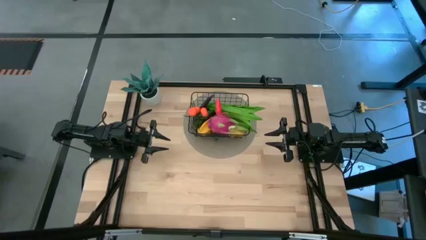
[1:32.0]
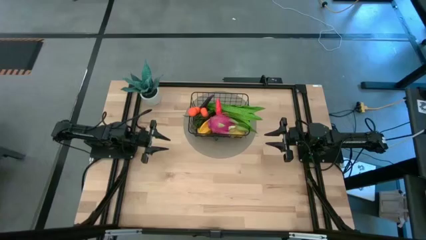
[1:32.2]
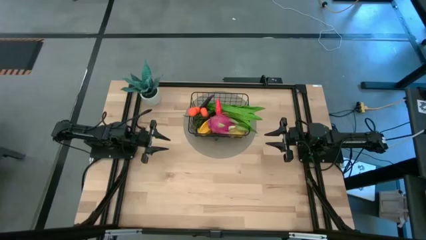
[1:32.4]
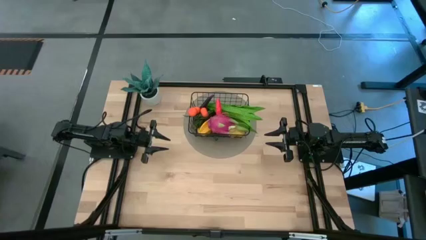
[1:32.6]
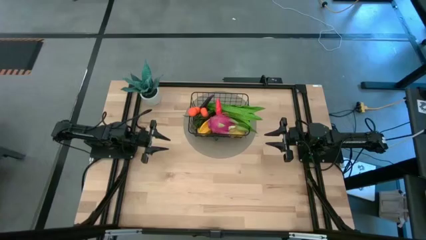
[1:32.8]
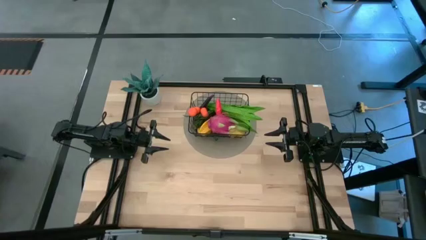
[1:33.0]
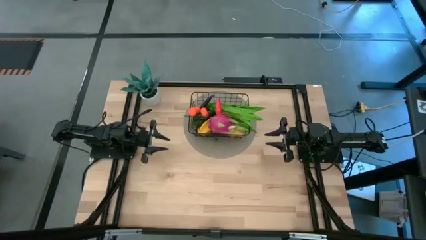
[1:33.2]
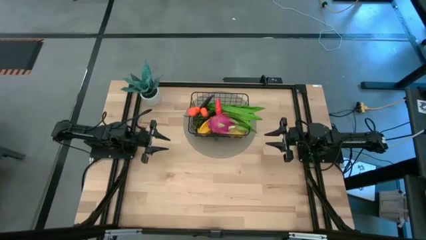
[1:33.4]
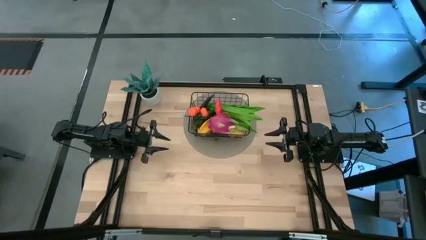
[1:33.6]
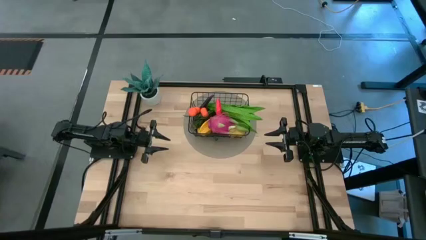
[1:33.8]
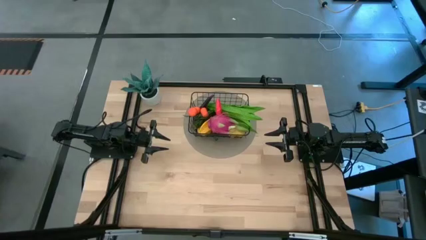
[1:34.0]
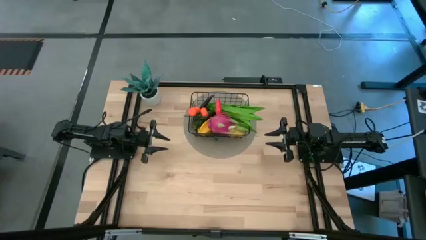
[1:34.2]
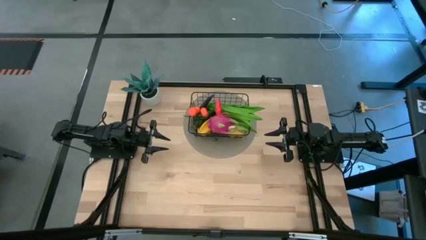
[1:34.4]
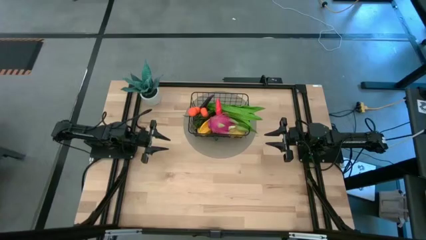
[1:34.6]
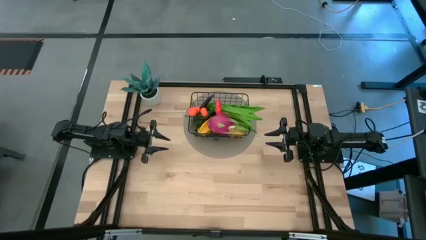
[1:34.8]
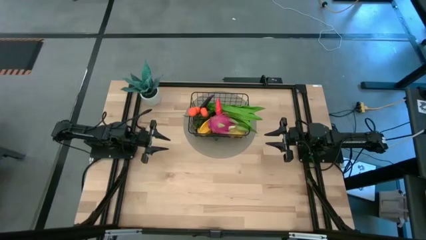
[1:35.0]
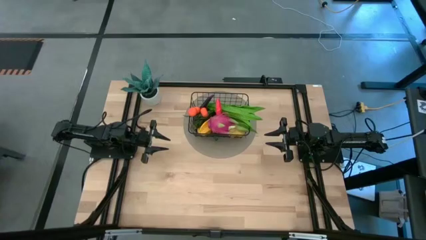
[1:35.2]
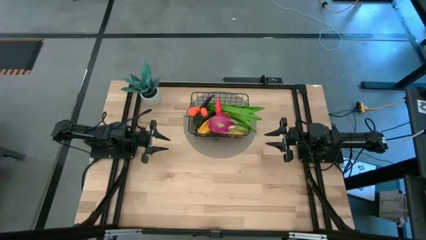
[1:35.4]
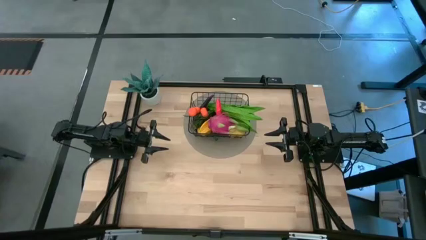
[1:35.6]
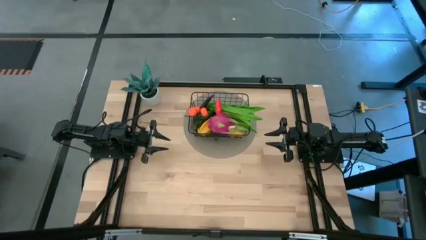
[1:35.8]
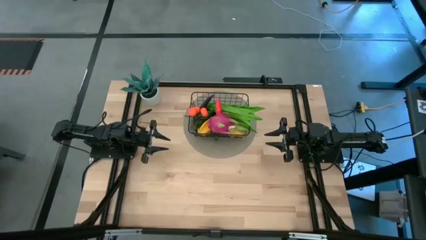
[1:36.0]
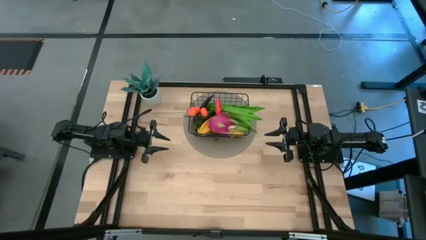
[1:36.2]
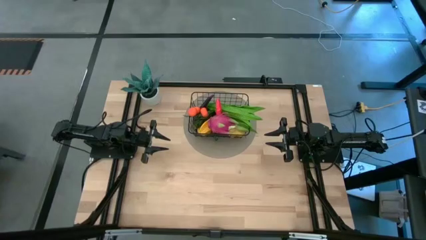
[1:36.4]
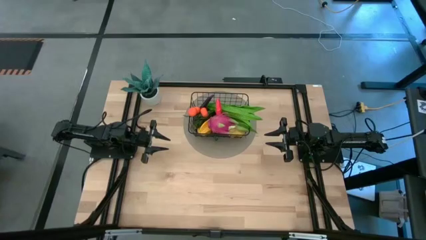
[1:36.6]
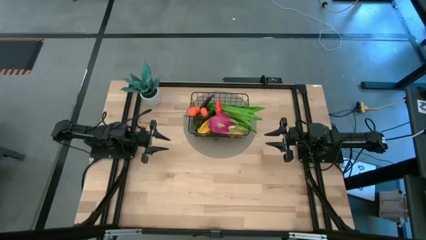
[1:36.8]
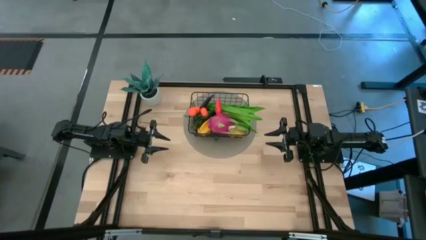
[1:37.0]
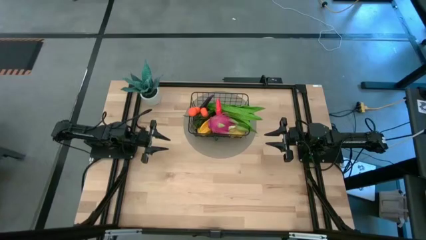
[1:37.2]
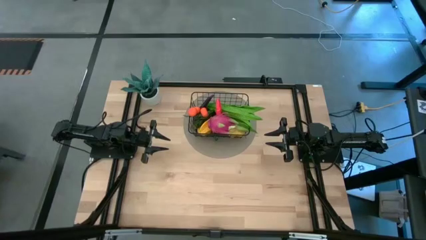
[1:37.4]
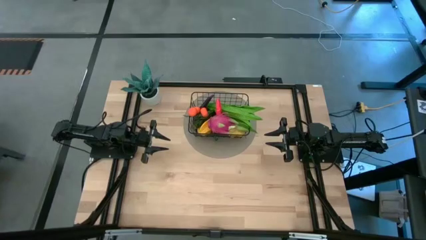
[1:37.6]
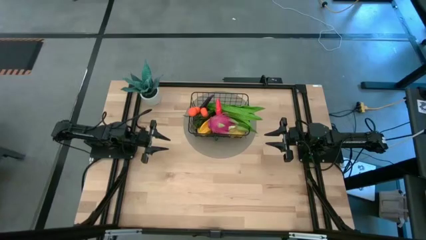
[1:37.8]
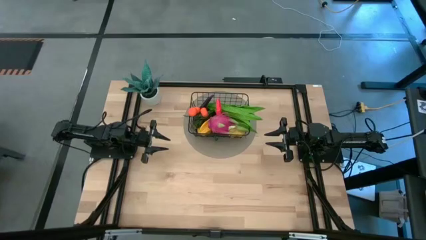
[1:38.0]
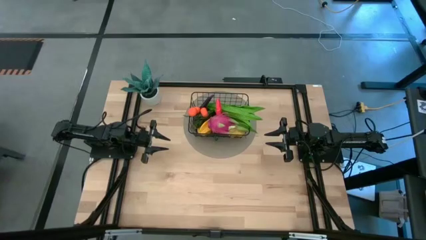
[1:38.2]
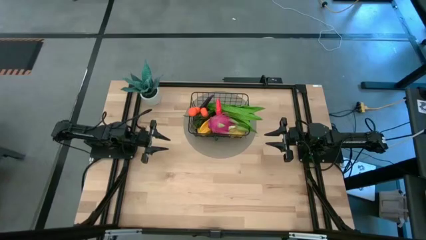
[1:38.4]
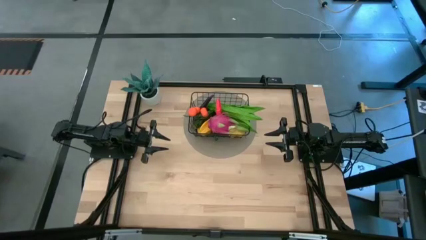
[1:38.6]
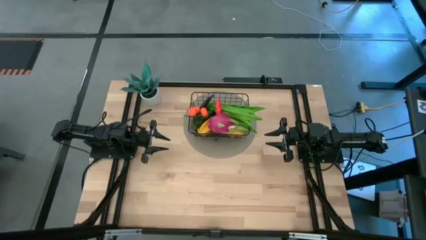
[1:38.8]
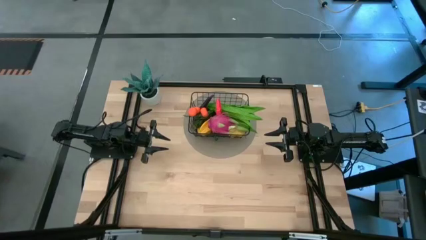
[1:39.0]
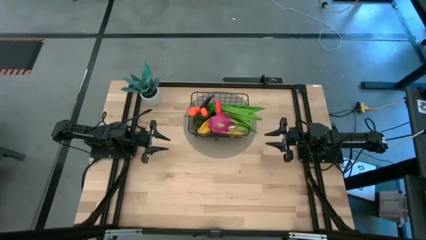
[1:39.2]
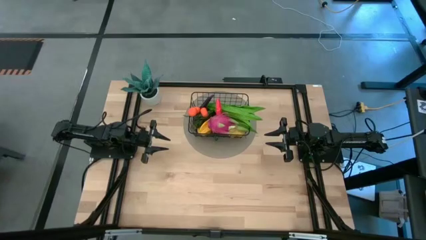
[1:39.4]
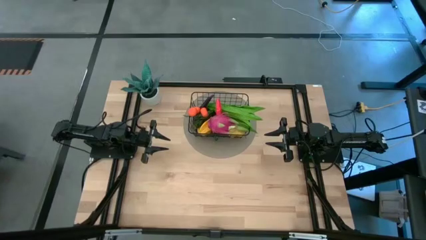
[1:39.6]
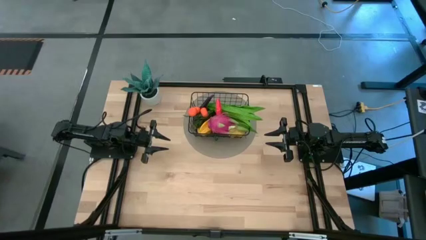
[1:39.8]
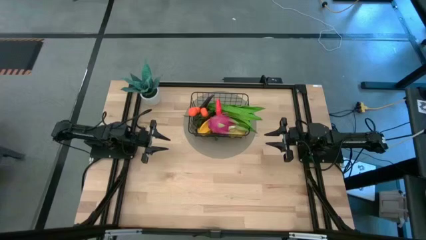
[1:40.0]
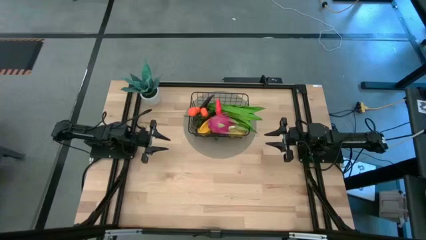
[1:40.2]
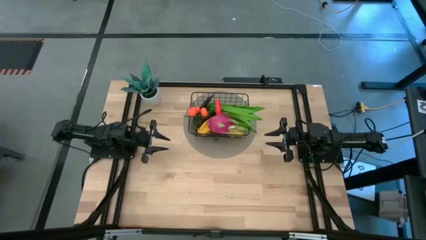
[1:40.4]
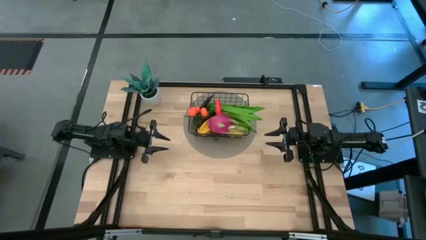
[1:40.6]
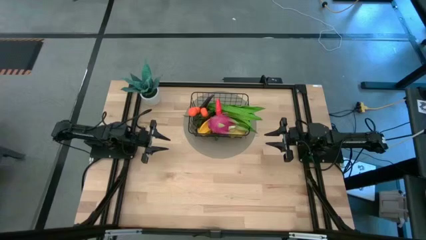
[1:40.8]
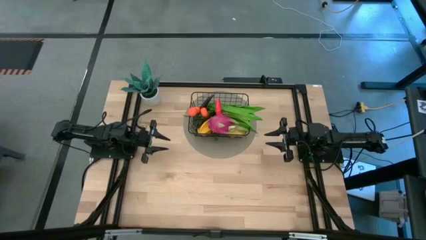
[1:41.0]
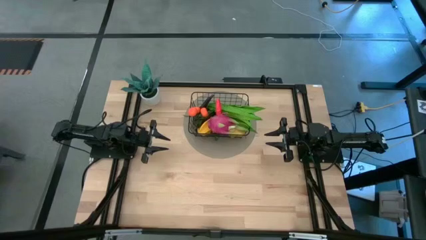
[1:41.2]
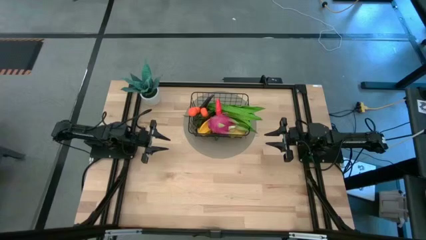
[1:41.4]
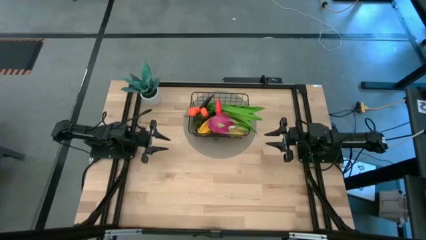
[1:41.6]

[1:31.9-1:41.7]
Task: Build produce basket
Return to Home Position

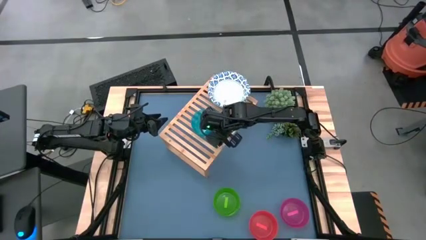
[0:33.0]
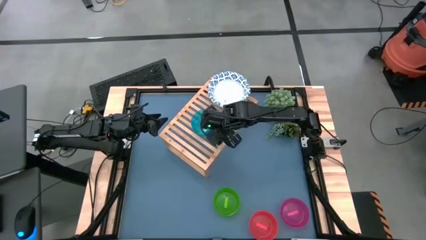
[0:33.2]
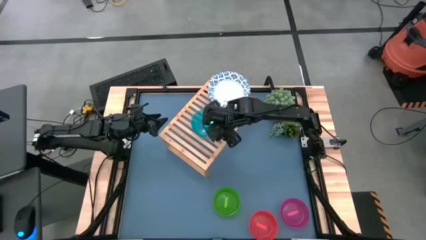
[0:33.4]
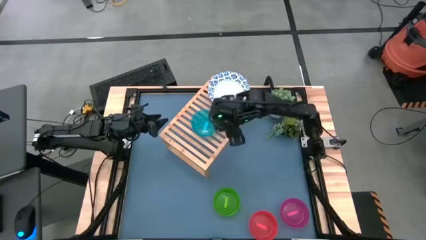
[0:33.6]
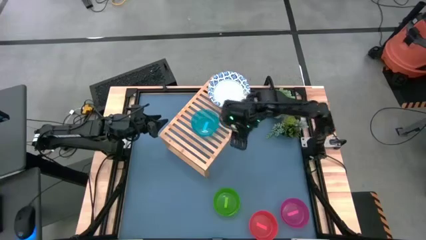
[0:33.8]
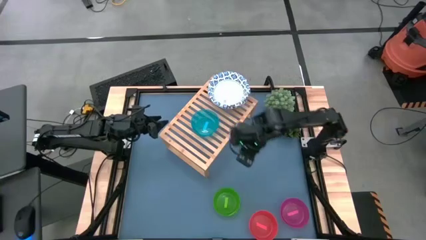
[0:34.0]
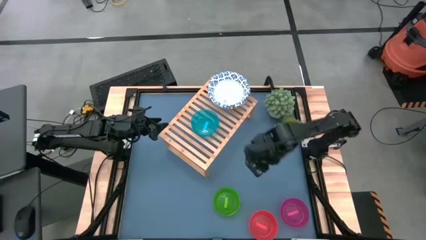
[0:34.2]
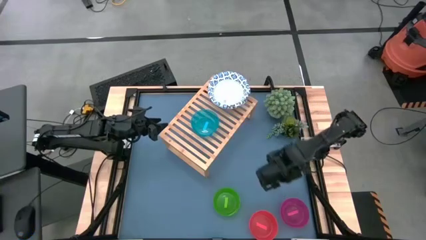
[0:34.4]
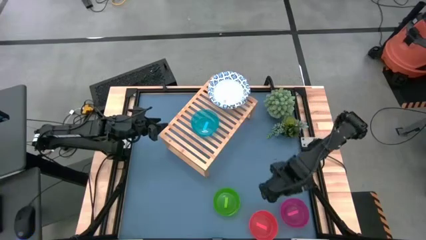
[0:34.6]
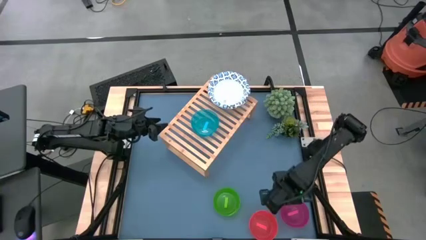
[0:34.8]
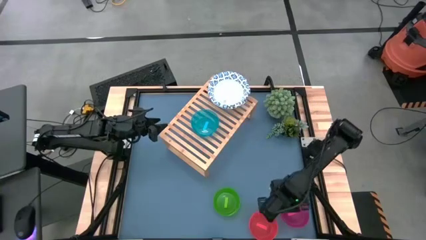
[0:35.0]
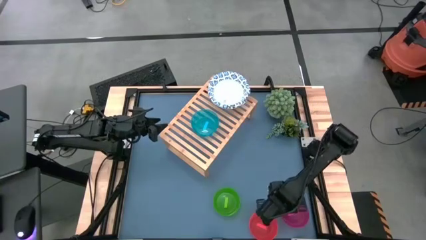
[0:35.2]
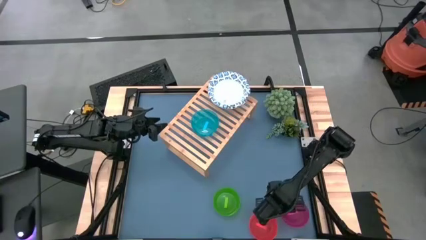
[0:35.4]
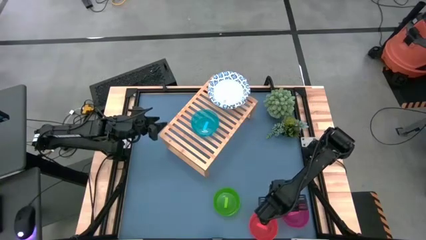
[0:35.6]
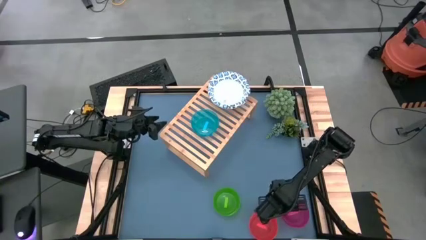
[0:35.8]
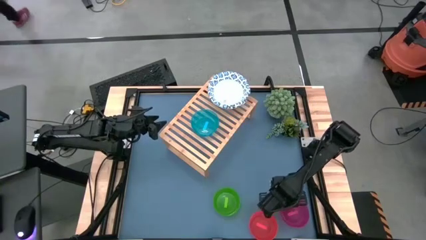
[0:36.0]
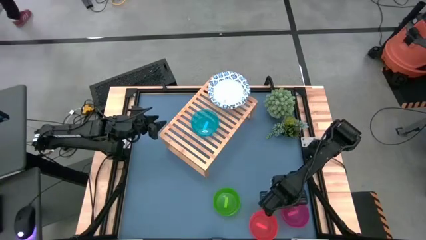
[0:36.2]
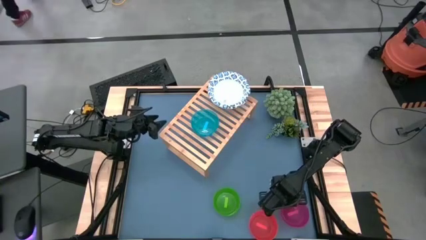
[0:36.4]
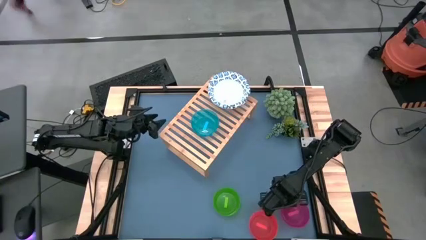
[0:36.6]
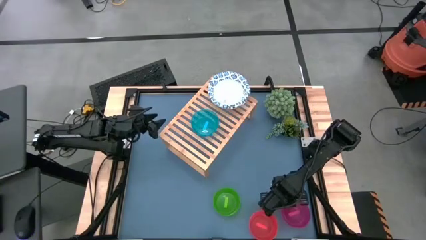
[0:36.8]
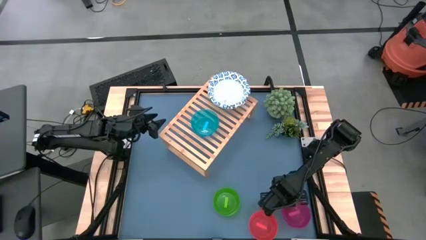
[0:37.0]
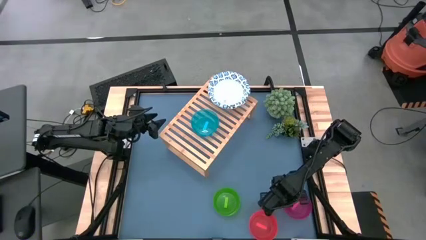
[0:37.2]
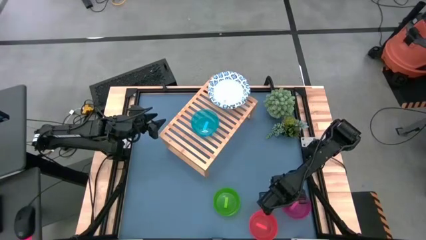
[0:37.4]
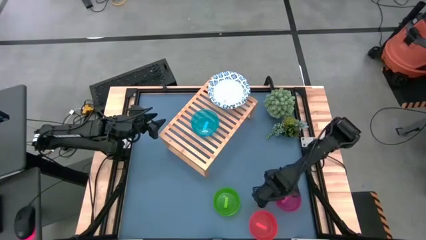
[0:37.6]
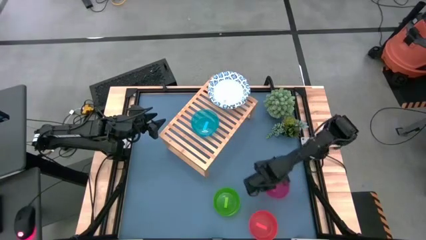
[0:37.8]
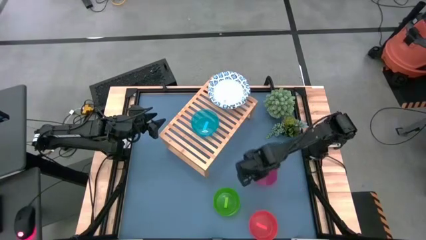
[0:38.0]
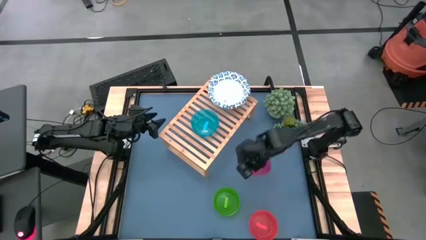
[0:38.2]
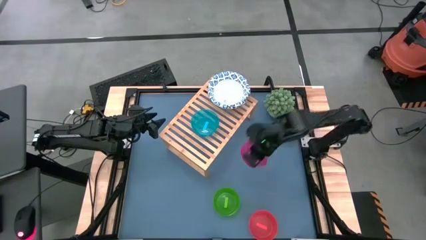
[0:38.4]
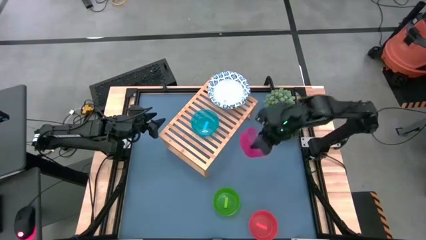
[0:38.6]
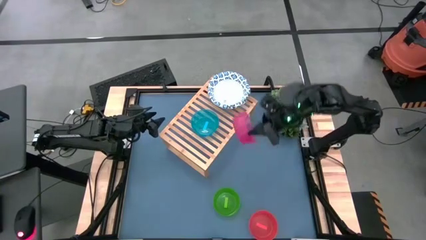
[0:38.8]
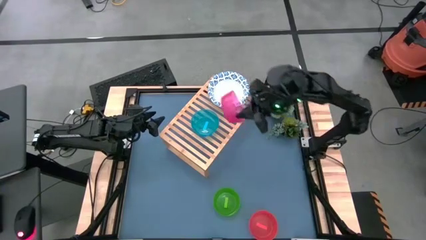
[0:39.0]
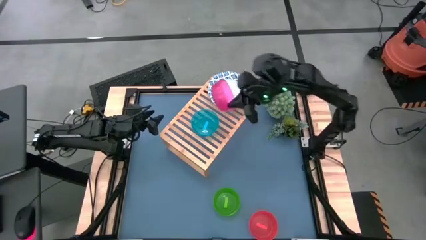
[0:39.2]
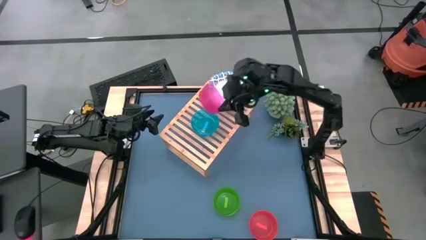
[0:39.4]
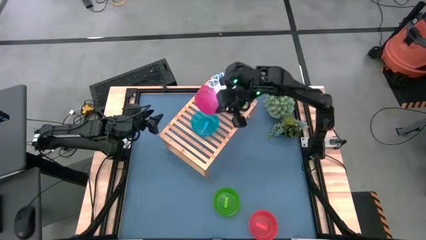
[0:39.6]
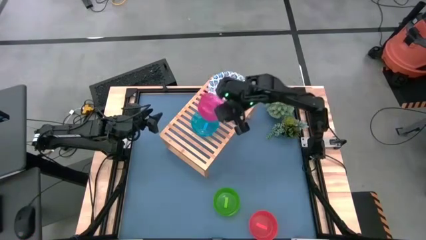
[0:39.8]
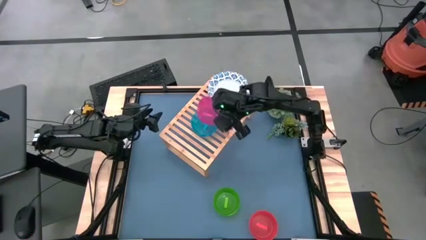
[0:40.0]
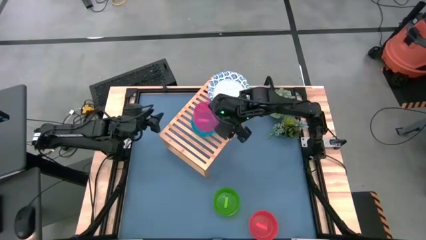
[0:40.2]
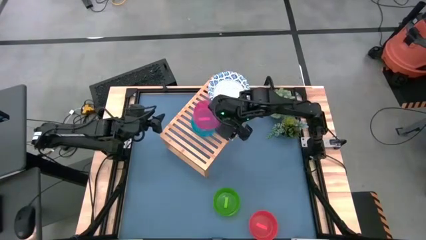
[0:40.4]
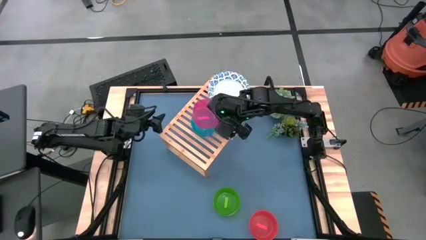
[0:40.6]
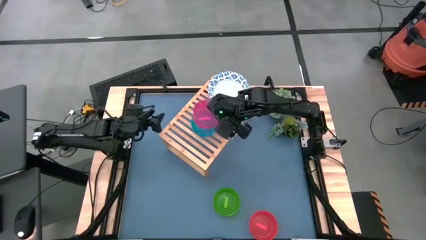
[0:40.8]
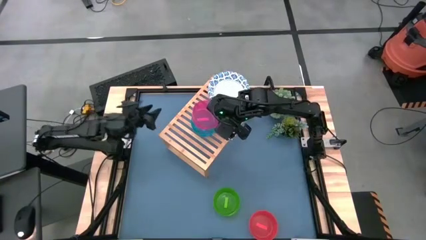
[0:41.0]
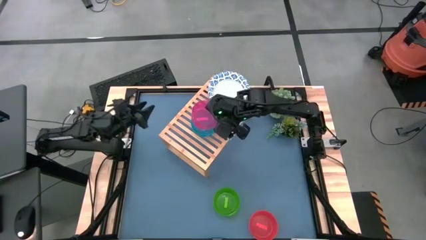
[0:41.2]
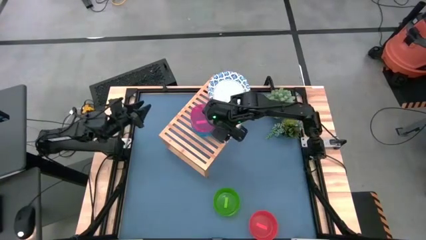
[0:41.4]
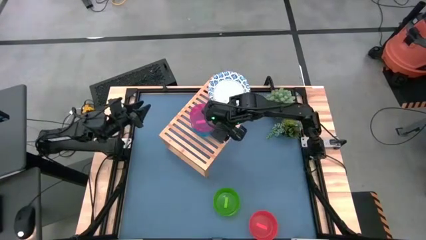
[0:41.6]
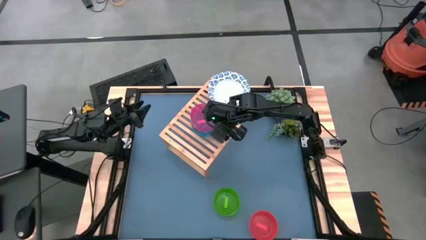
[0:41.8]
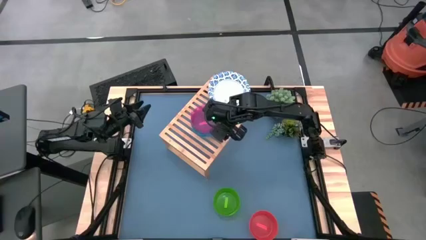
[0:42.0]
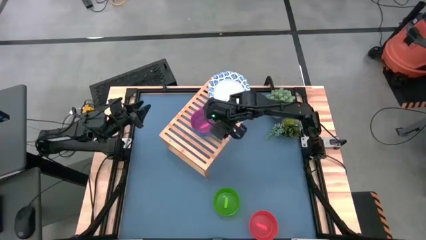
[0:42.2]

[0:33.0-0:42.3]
Task: Place and stack bowls onto a shelf
Stack the pink bowl on top of the blue bowl on the shelf
